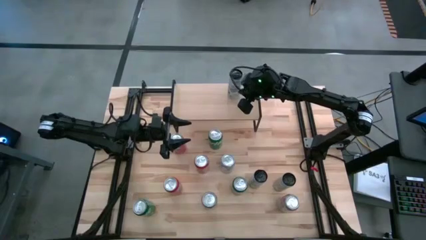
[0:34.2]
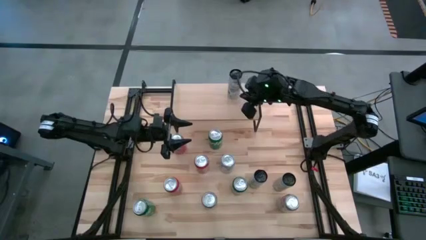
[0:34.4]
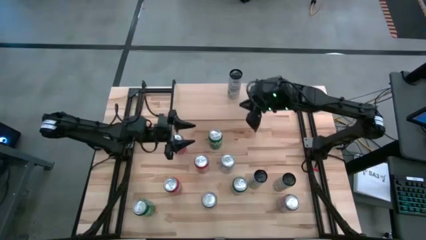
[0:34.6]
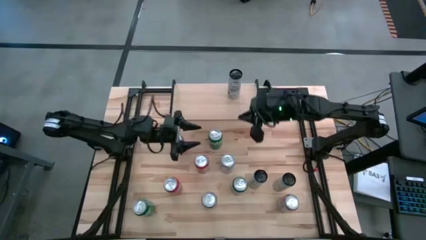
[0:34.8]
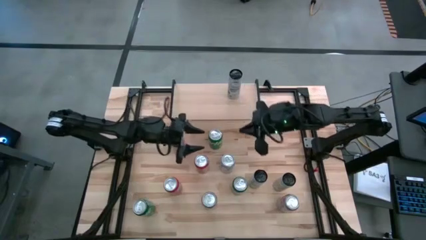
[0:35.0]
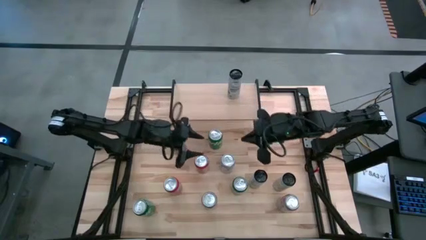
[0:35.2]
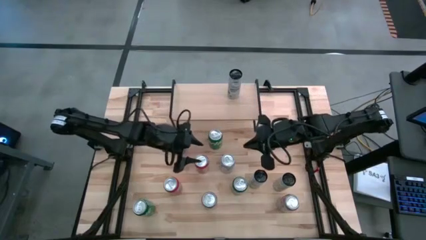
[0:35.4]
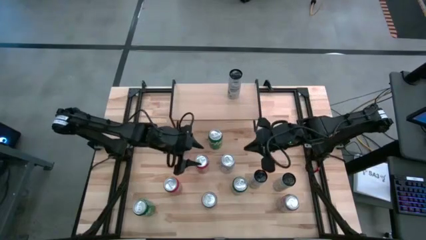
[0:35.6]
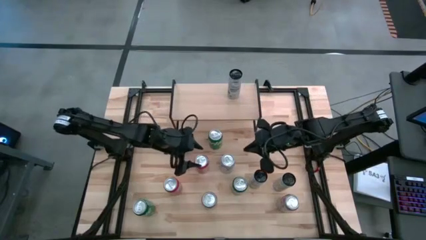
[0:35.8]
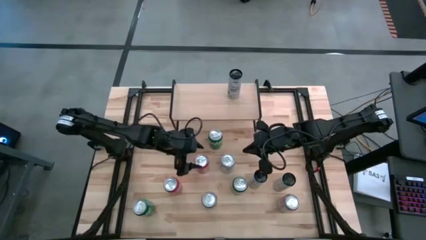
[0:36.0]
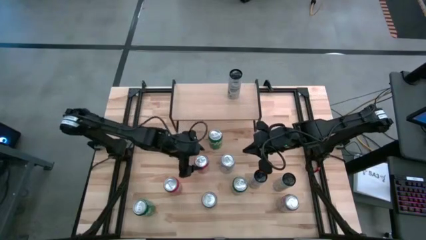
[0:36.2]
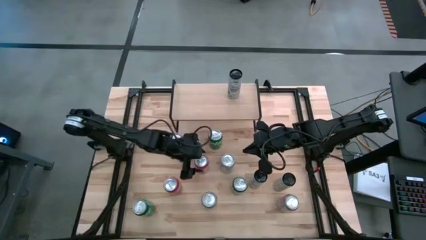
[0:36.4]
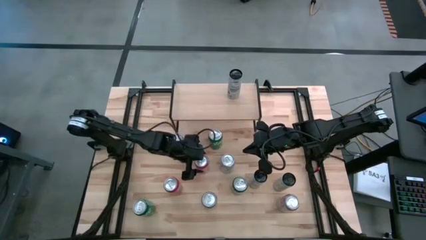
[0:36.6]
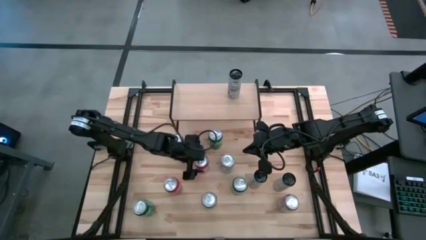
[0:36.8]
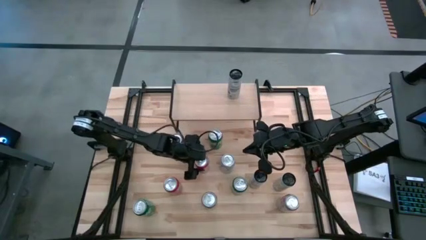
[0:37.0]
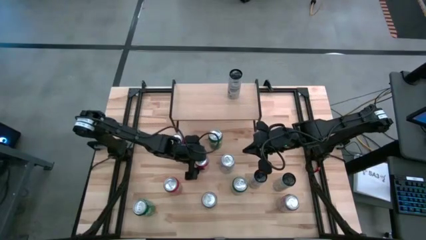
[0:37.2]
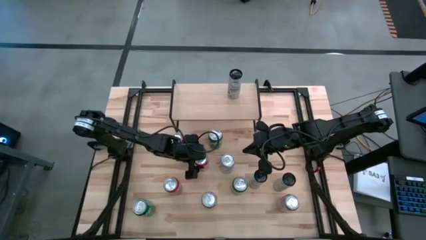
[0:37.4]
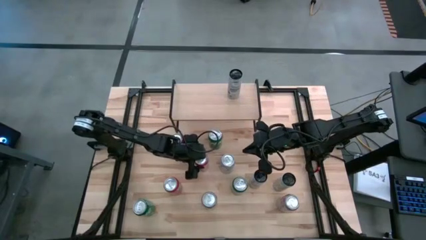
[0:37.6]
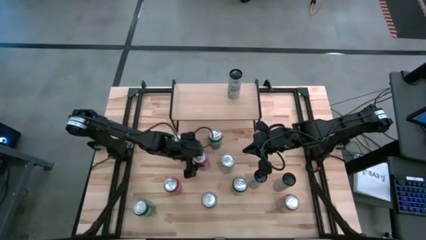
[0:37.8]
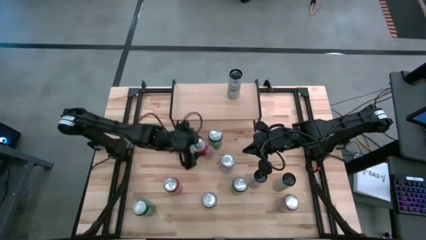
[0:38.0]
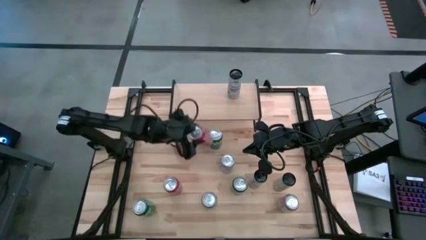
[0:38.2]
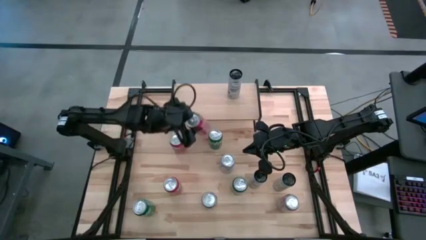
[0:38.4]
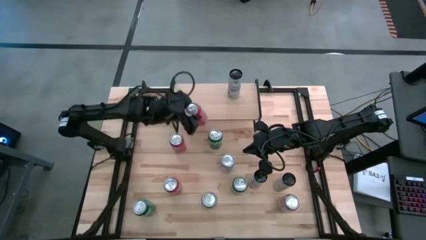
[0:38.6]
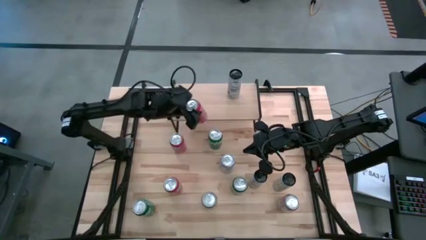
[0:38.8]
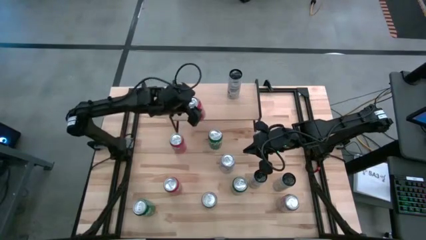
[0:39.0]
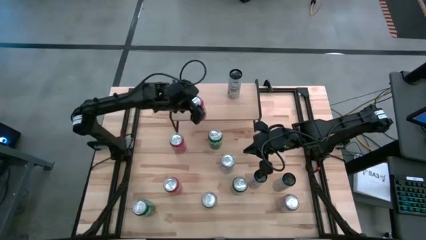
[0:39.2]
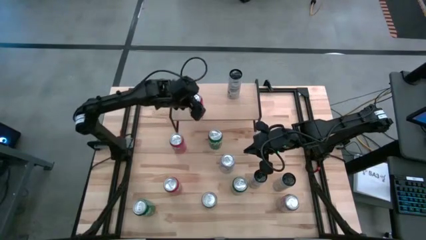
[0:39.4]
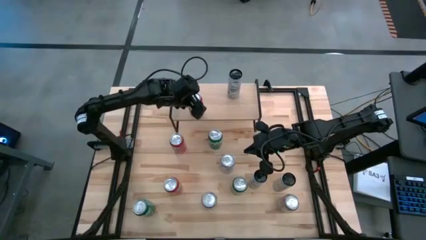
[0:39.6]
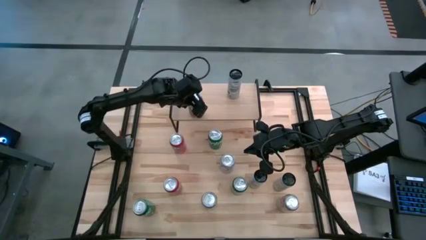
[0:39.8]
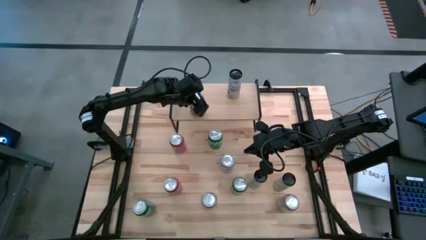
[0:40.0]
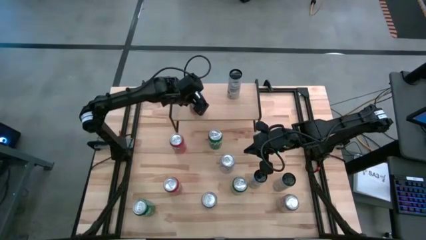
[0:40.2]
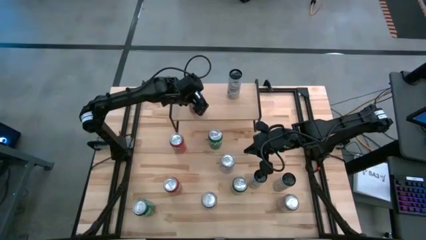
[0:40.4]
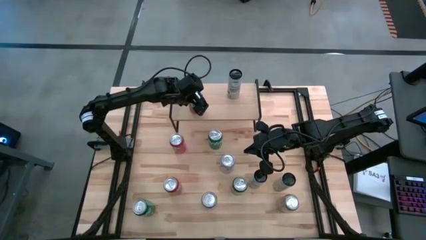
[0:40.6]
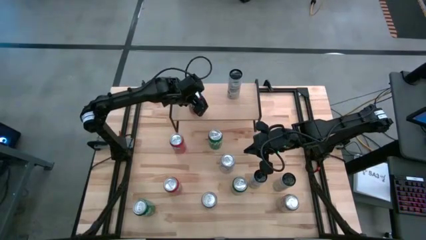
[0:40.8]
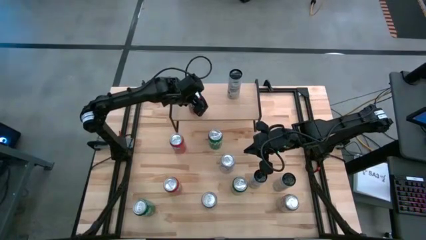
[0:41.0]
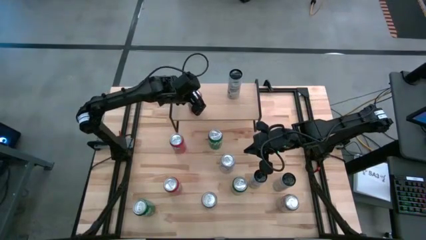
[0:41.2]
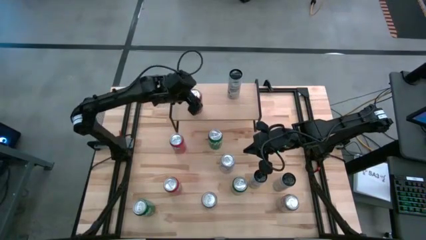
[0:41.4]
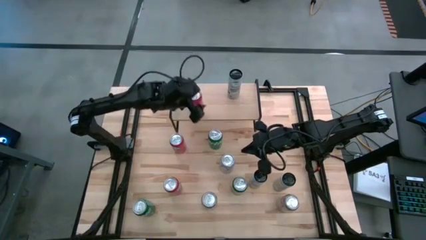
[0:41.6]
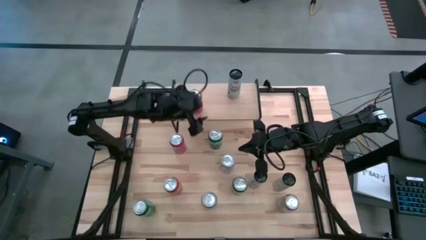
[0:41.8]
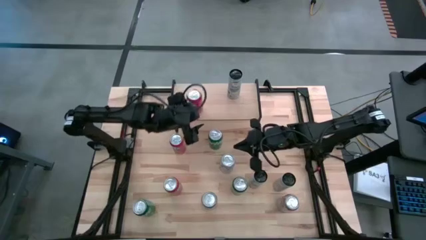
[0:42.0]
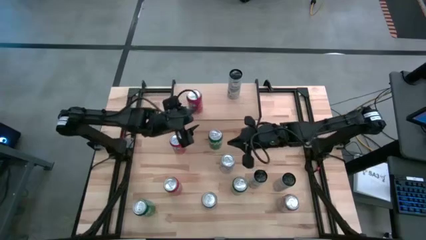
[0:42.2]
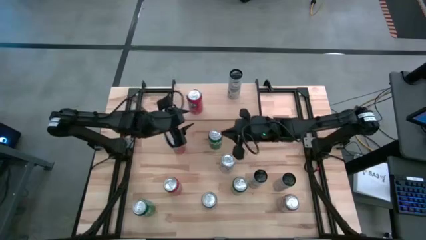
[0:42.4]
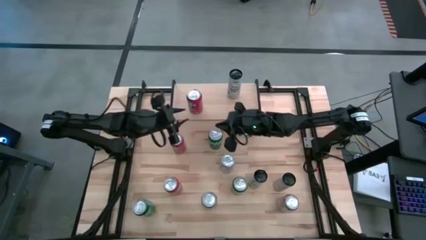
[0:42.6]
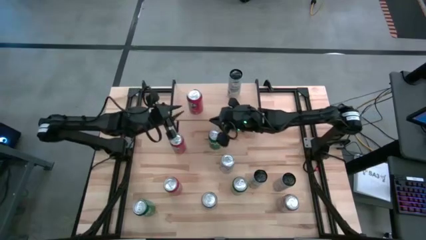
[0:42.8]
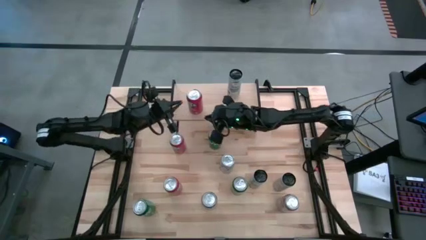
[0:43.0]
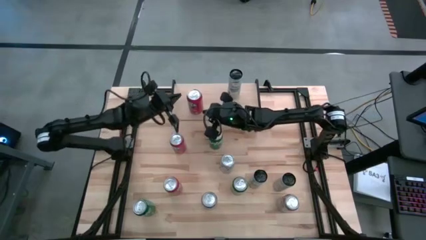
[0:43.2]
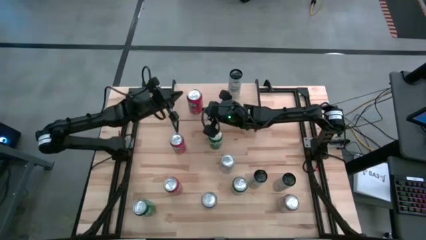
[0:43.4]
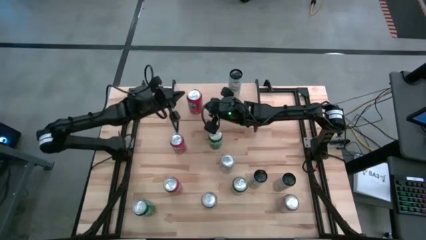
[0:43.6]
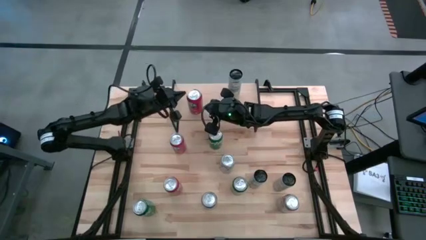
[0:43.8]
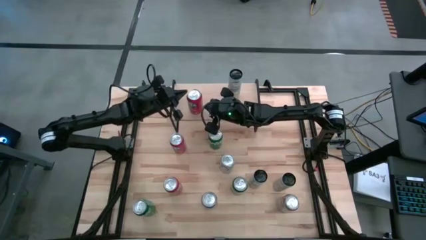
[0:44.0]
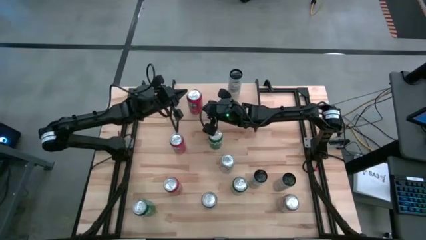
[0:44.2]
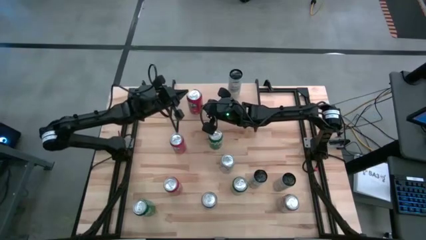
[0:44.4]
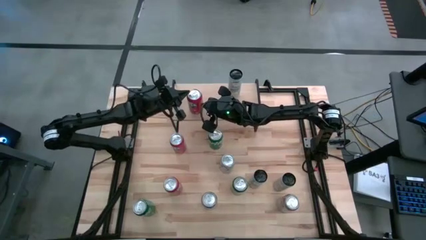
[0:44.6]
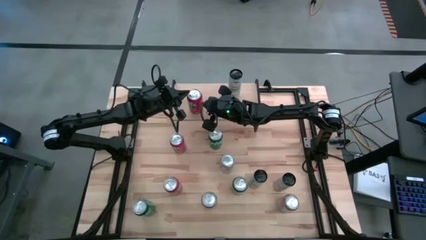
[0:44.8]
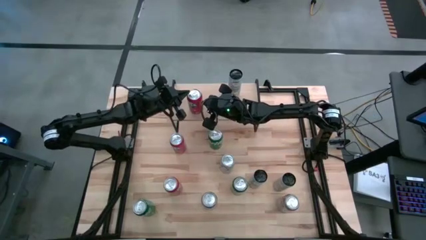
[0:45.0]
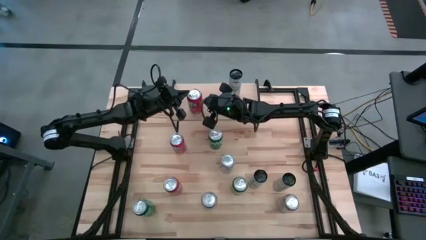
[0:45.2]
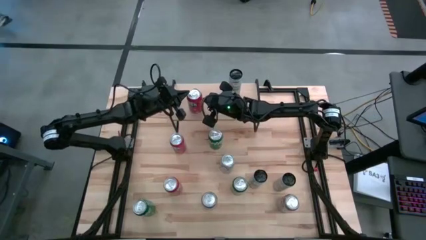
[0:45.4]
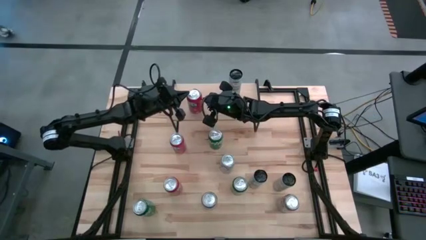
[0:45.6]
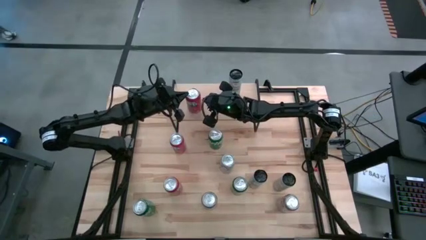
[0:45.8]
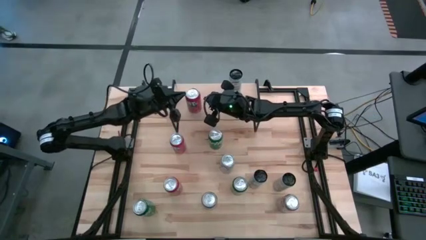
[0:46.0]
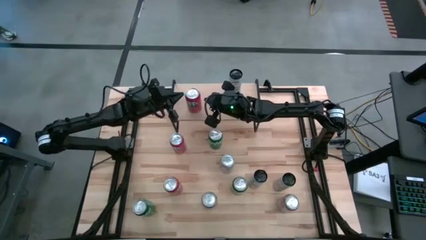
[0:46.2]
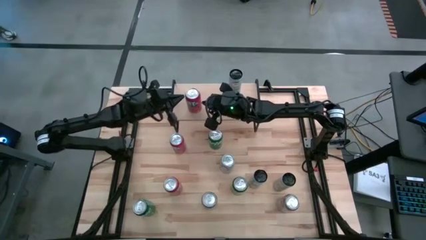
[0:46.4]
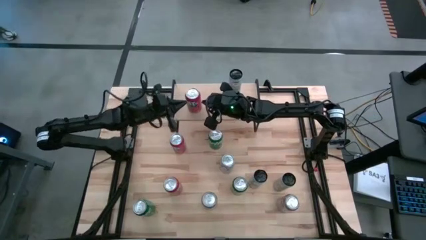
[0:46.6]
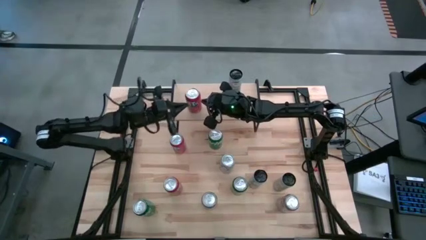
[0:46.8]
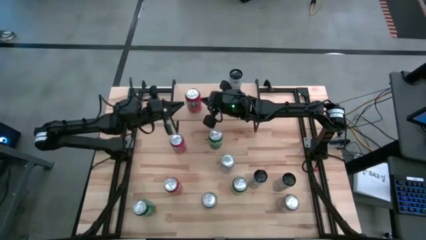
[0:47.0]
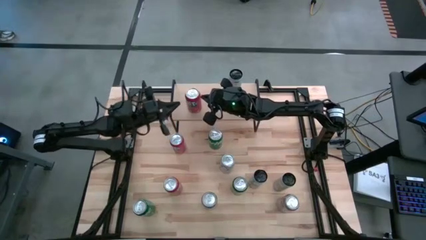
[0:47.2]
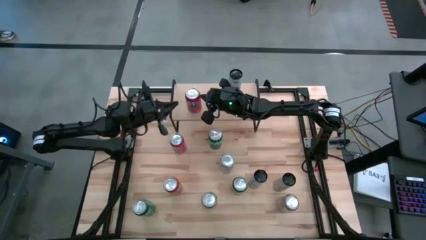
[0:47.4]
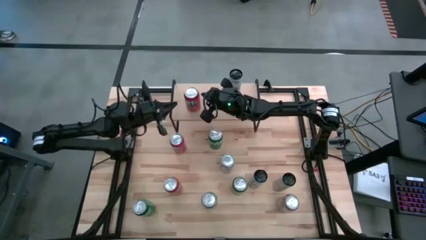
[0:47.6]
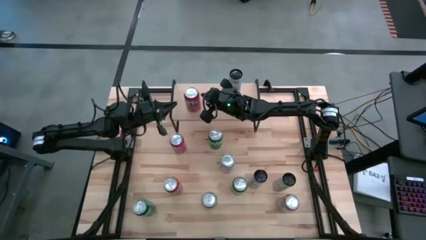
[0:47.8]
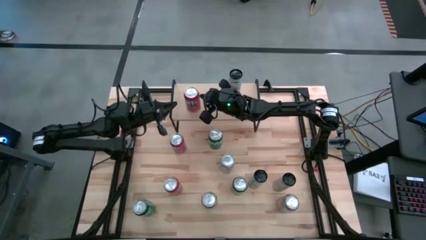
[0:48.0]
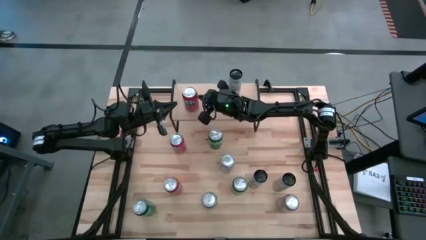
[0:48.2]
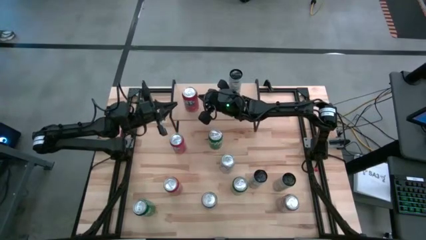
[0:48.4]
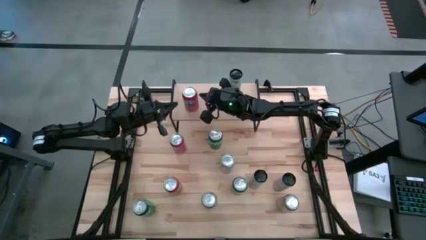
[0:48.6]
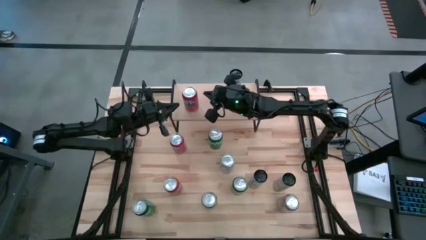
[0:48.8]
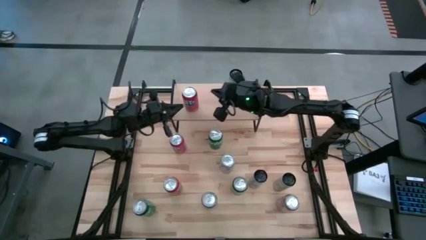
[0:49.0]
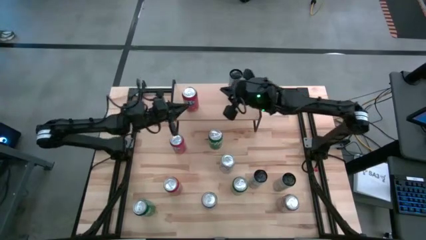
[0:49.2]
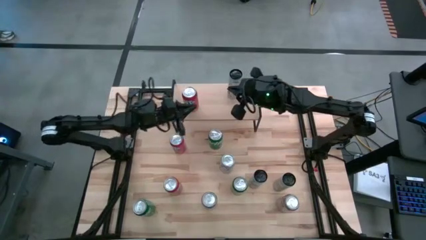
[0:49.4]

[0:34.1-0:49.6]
Task: Place canned beverage on shelf
Put the center orange soda can on the shelf
